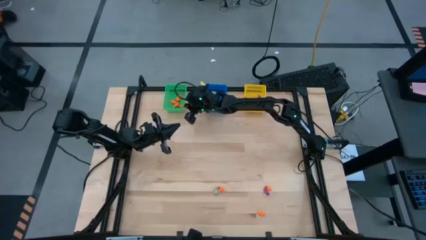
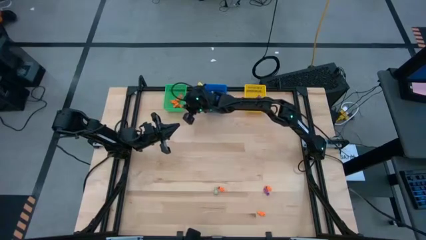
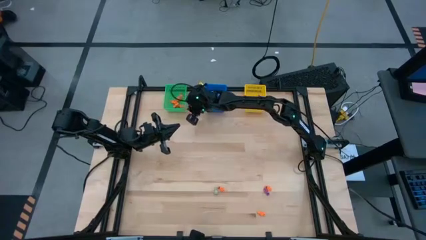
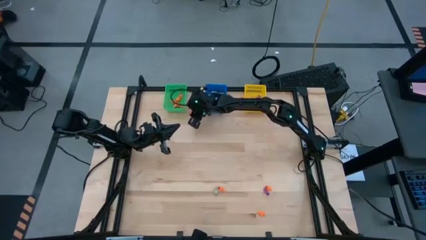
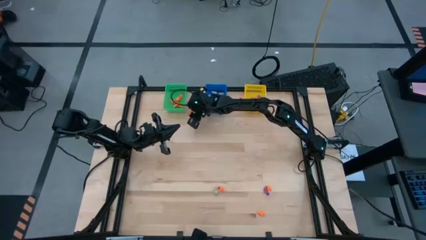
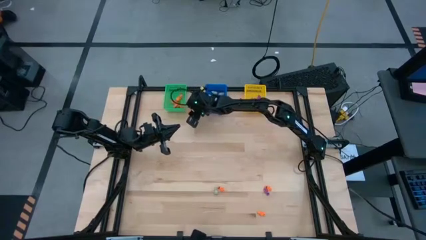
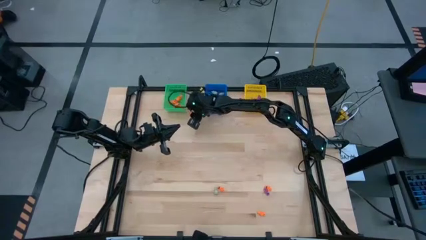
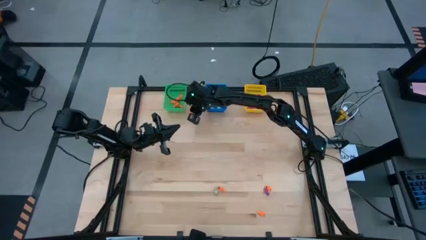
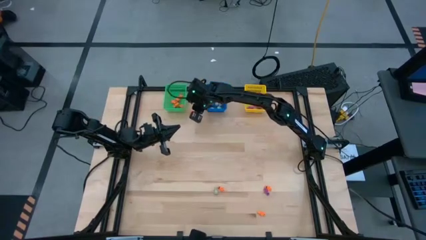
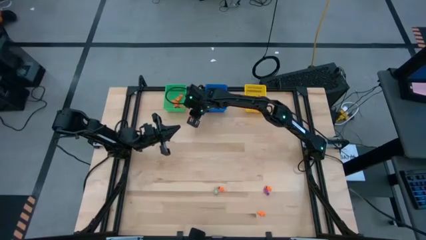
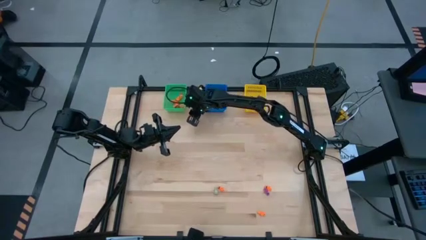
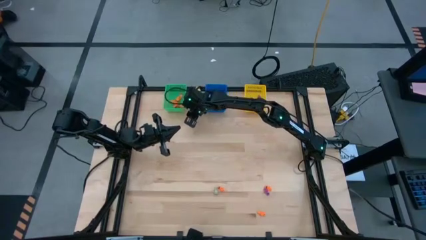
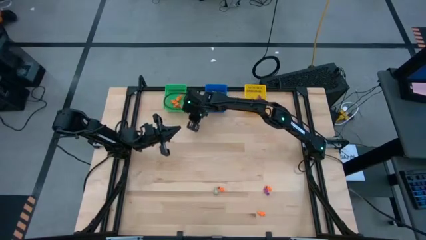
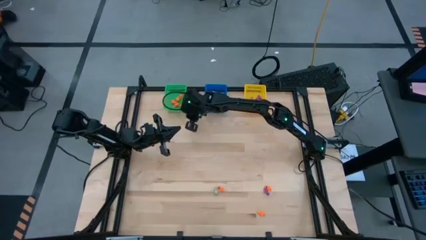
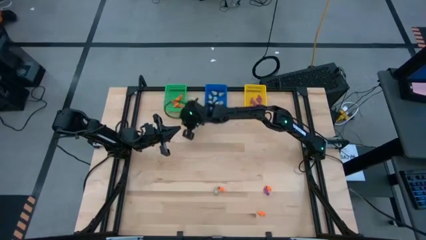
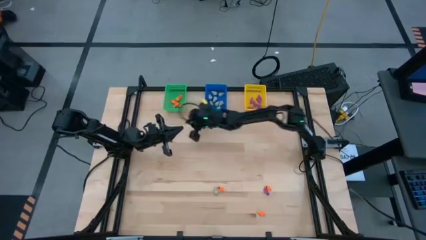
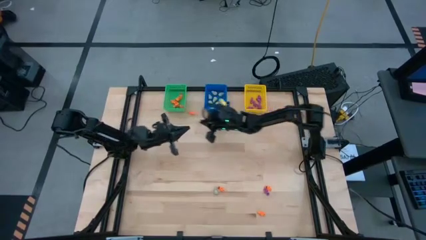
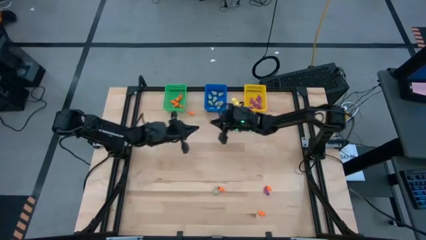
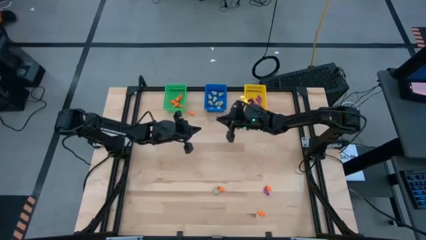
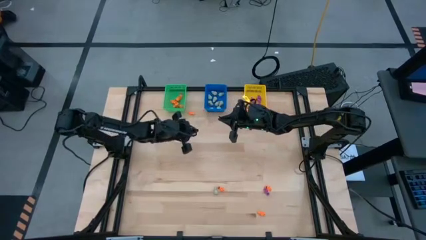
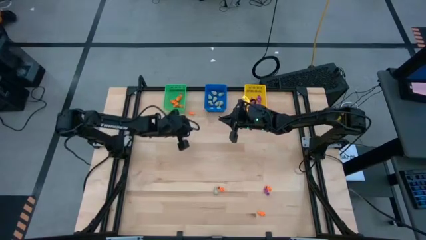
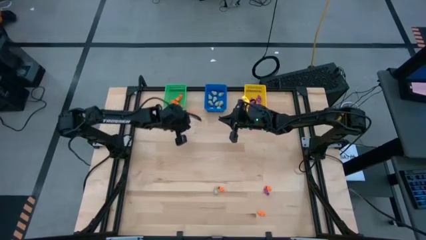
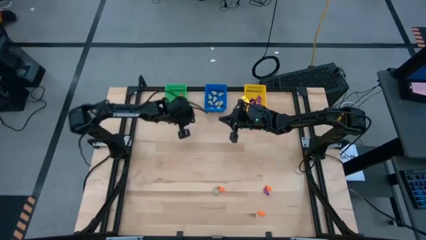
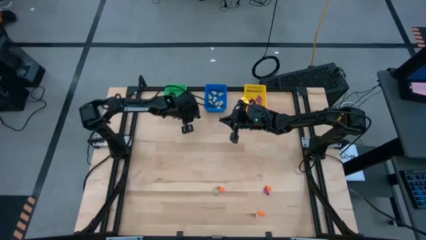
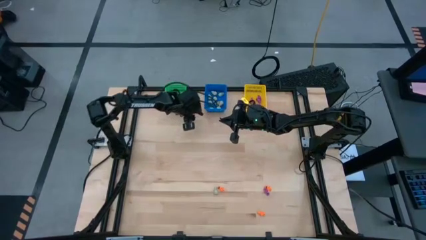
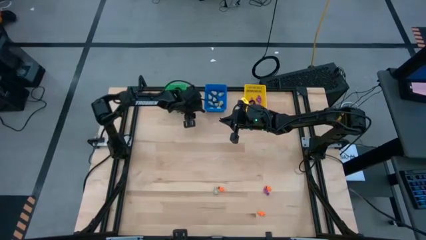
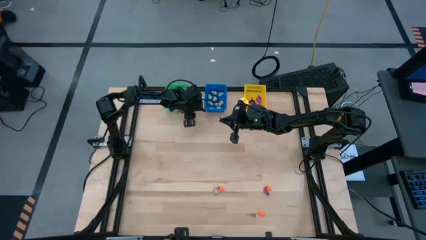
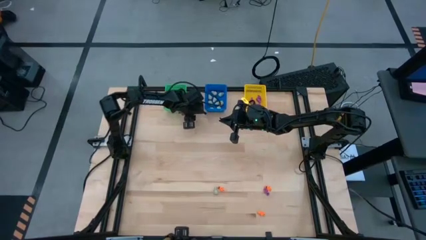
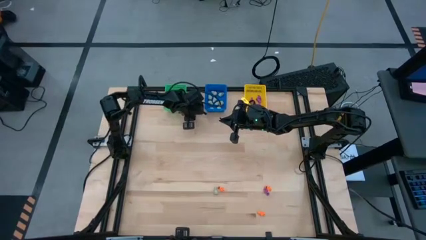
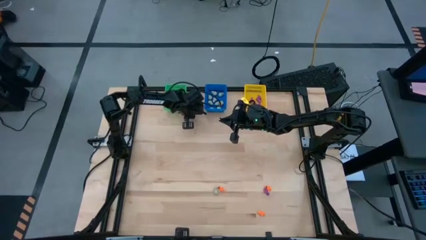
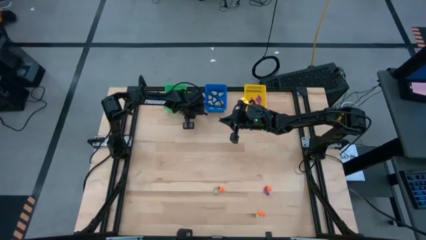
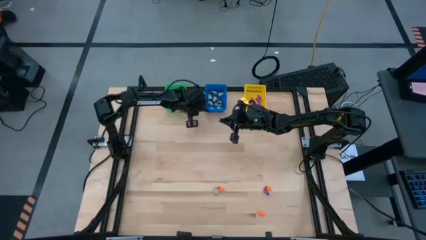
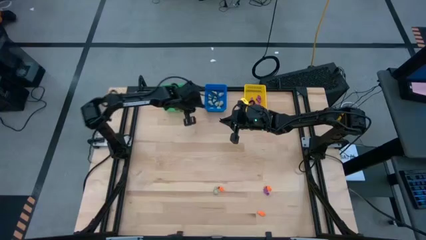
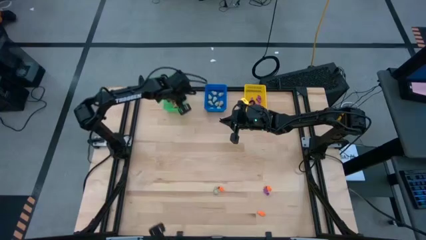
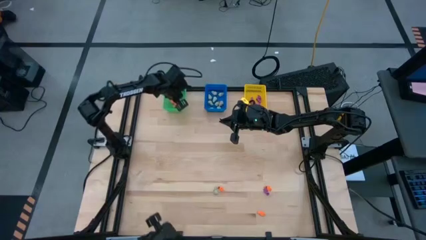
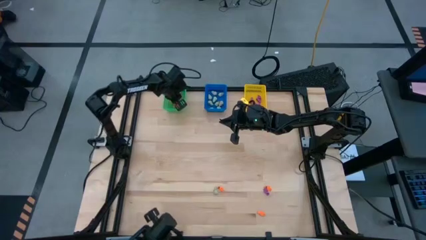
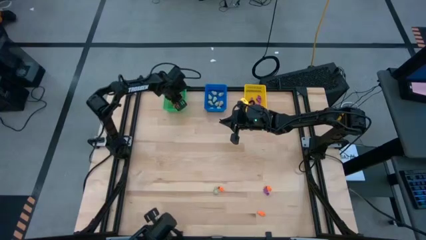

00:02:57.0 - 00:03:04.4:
Task: Sort Halloween decoration
Put the orange skeleton toy into the green bin

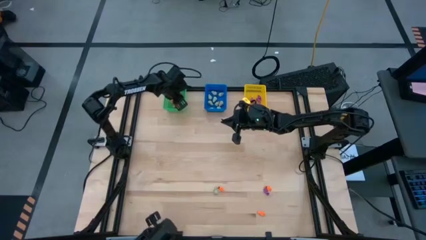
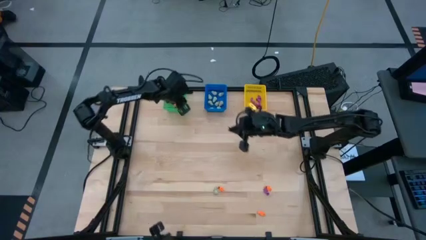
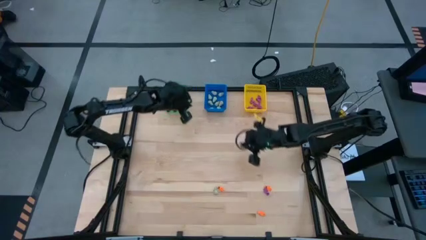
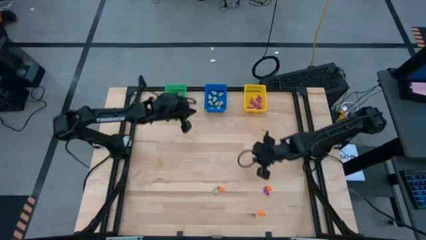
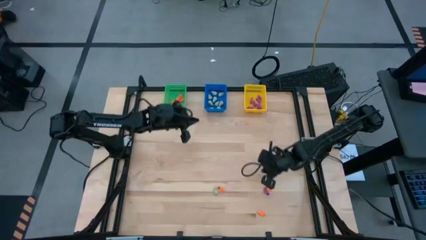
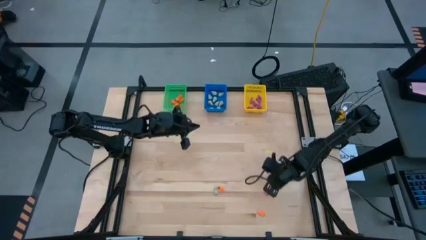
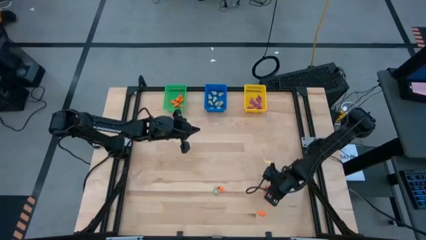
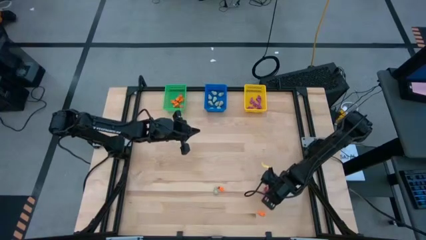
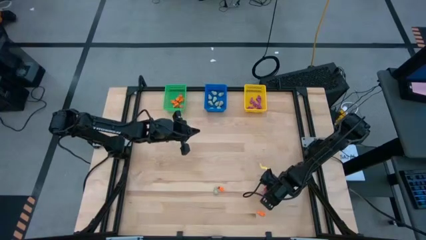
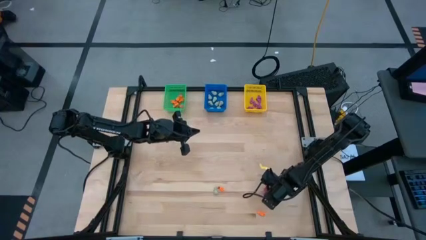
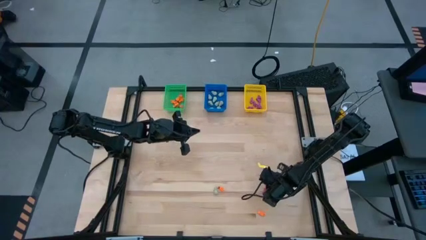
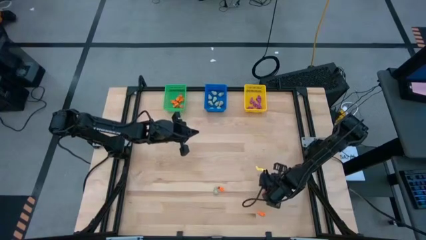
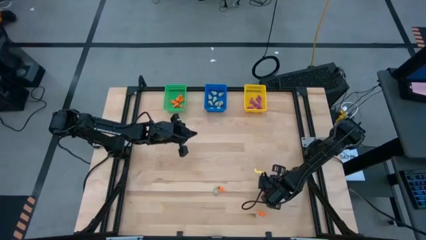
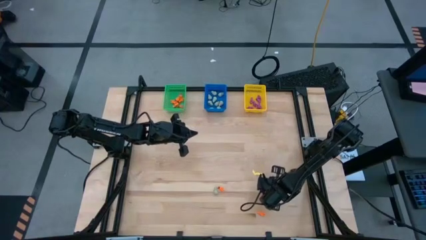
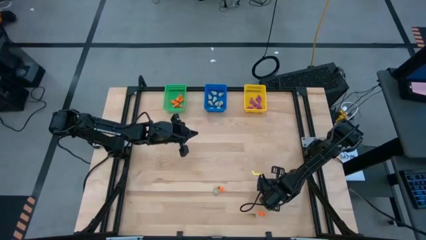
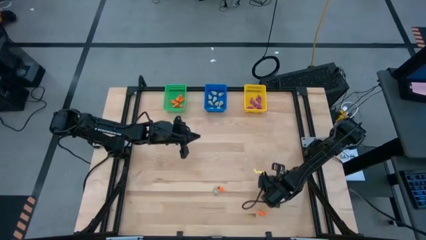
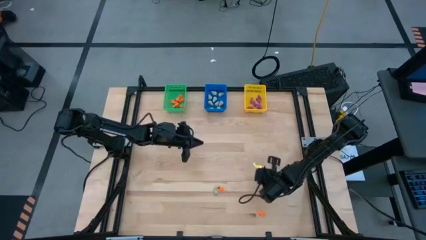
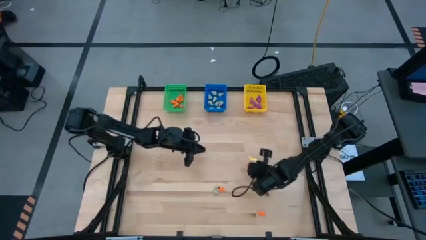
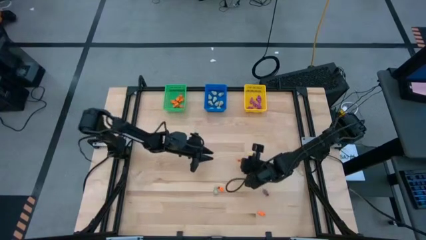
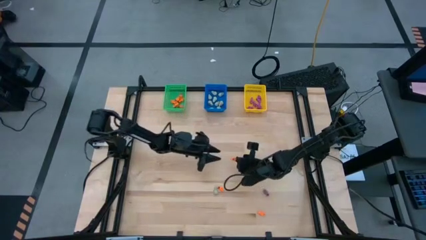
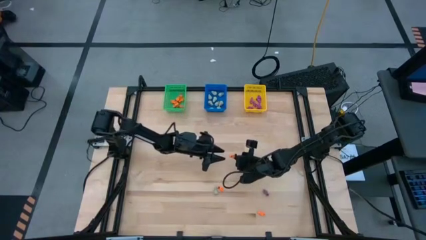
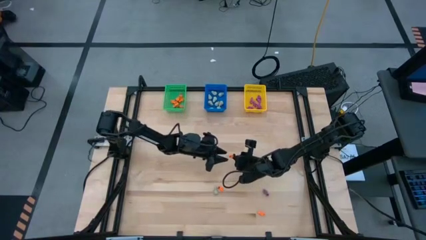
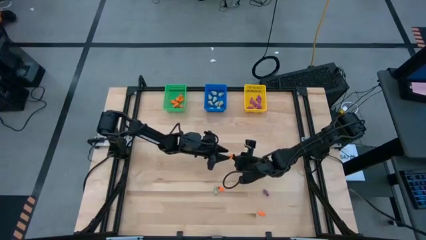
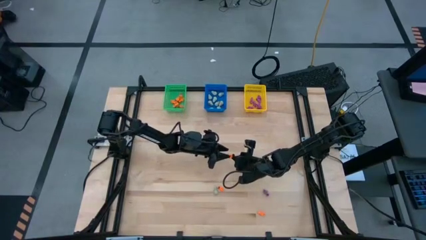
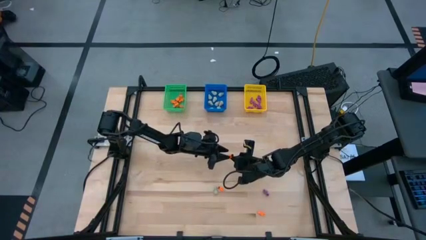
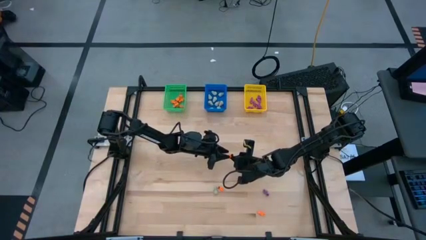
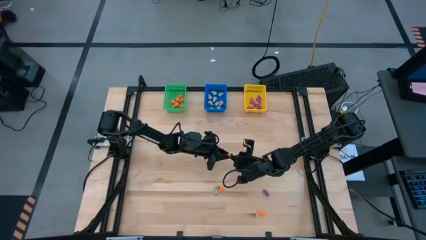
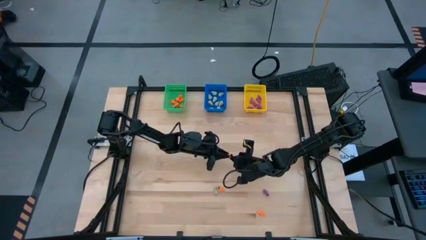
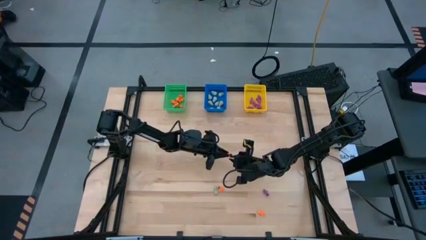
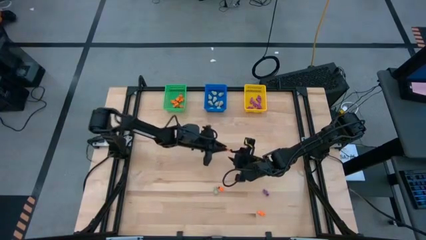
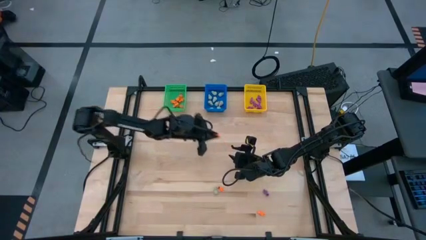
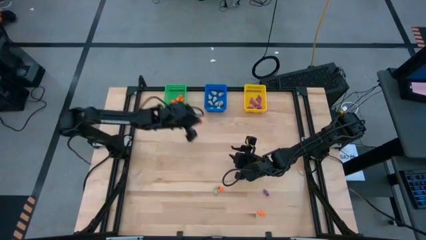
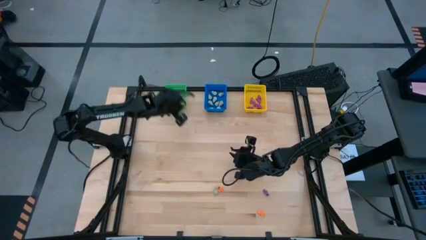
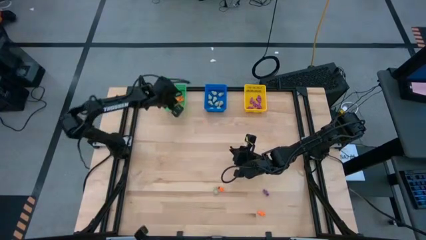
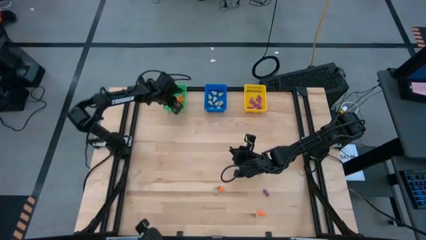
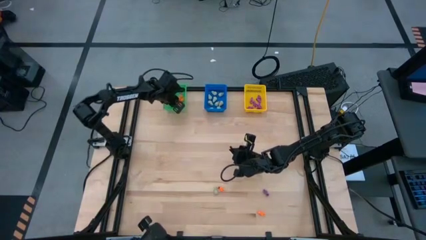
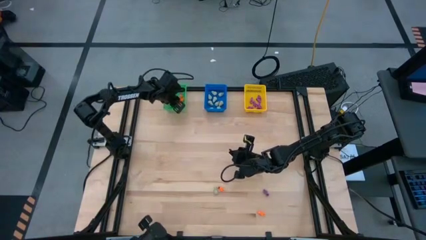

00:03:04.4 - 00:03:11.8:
Put the orange skeleton toy into the green bin

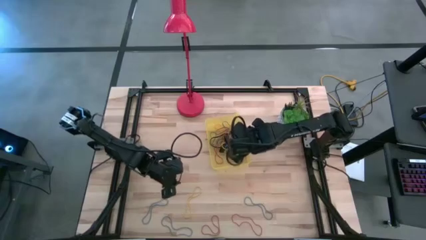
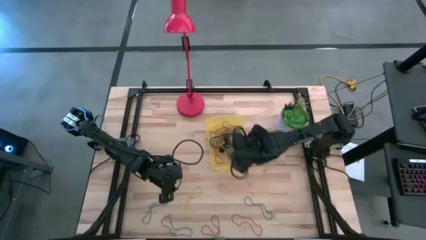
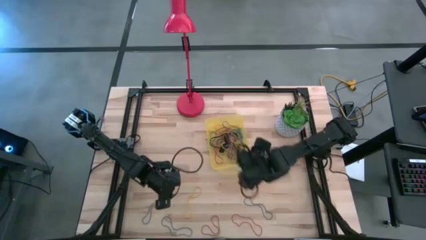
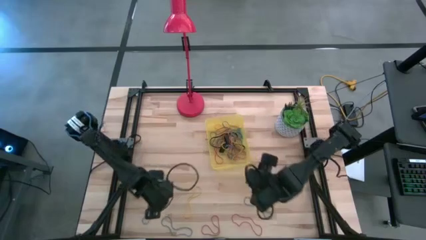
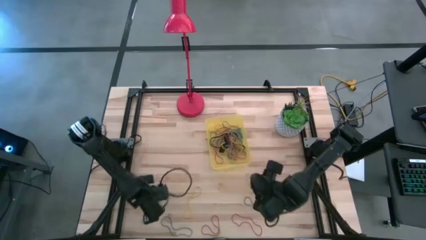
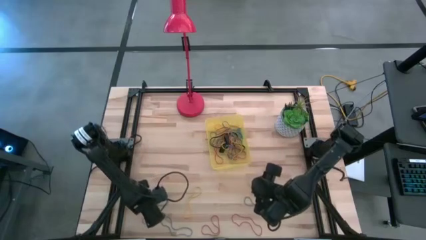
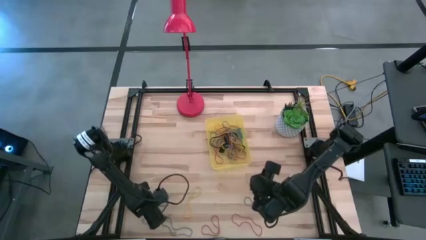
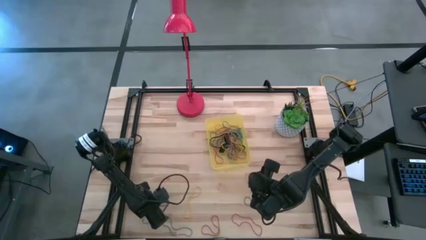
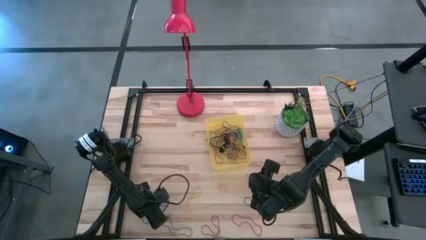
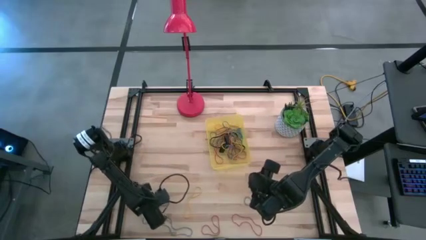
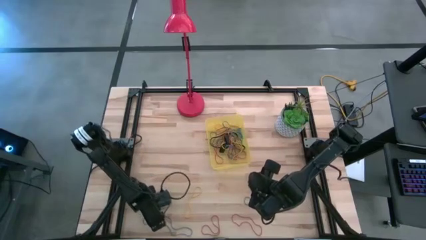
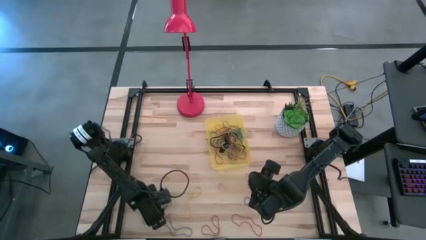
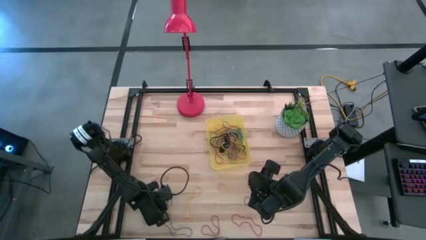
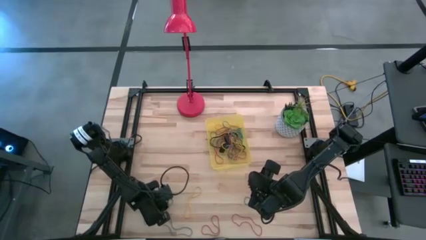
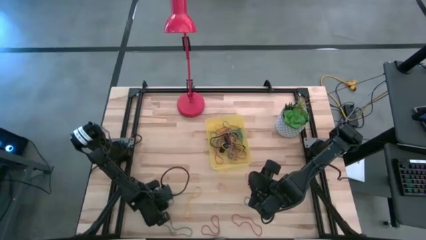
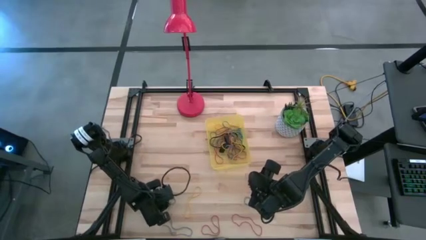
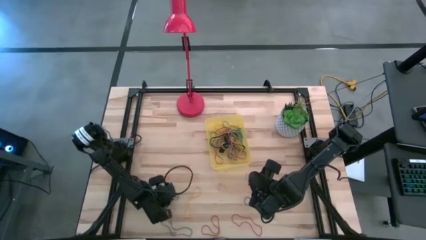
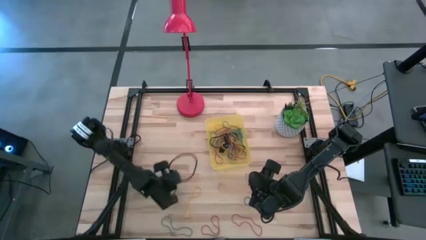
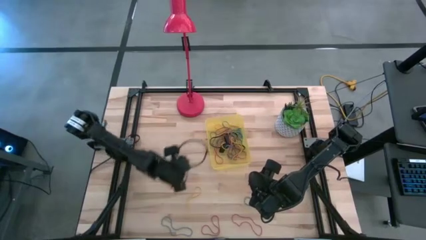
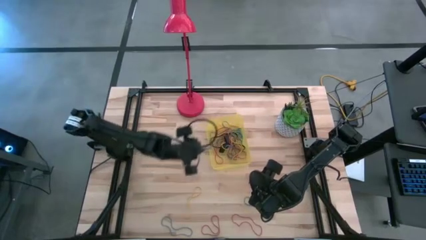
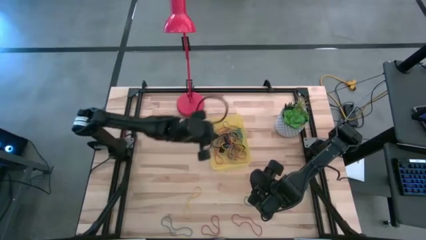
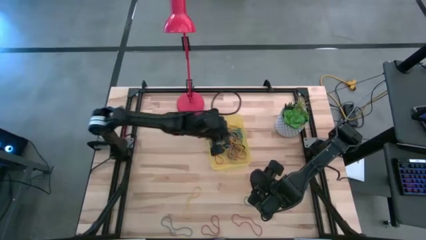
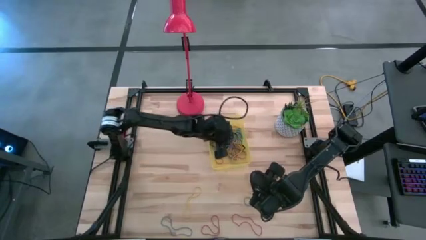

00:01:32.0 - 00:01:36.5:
Task: Pick and place rubber bands into bin
Put the blue rubber band into the yellow bin
